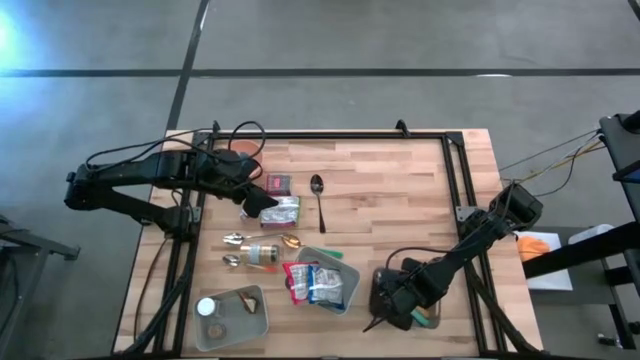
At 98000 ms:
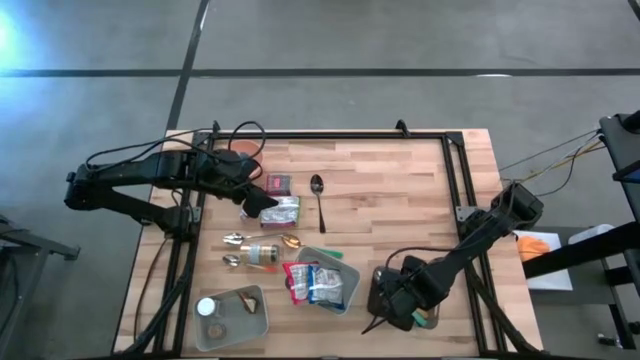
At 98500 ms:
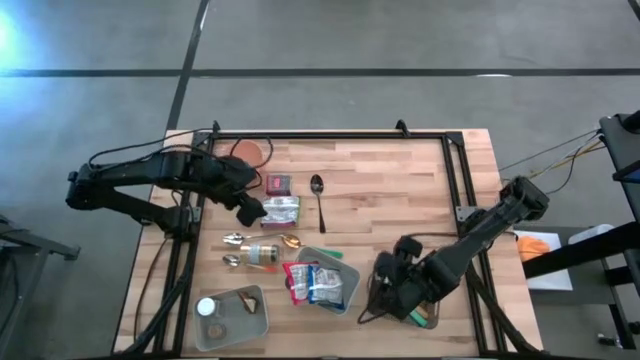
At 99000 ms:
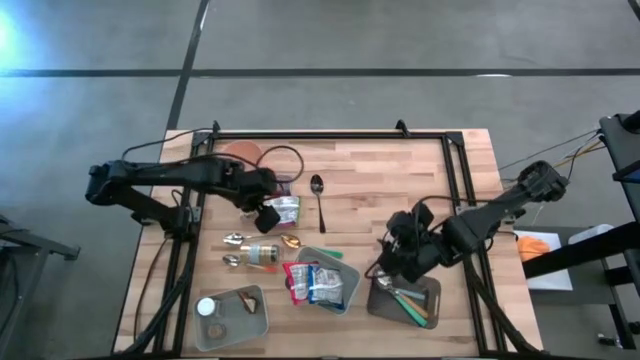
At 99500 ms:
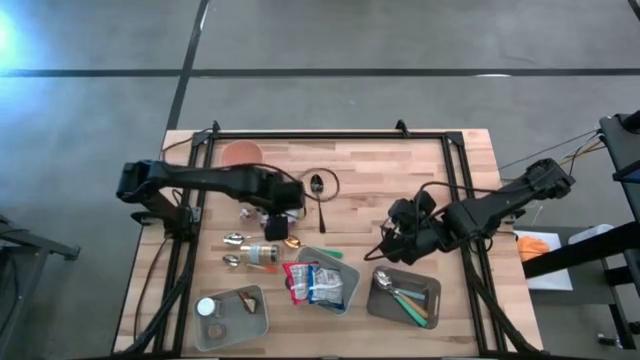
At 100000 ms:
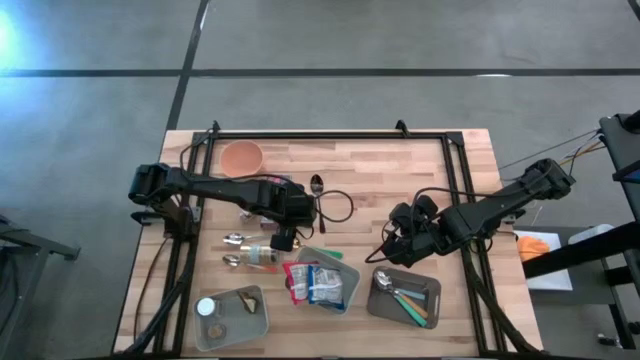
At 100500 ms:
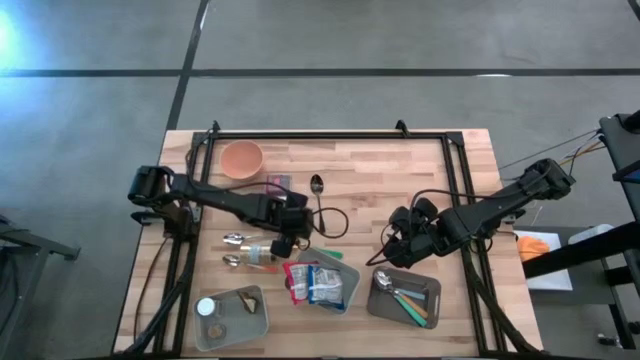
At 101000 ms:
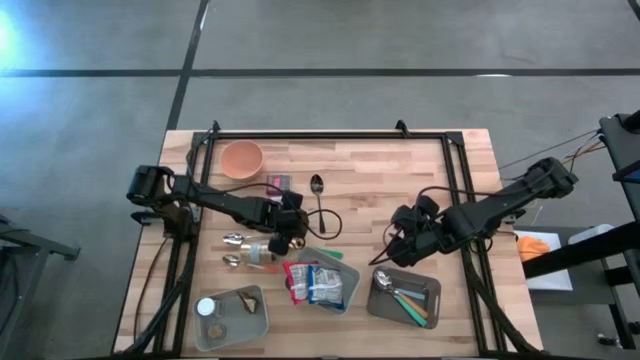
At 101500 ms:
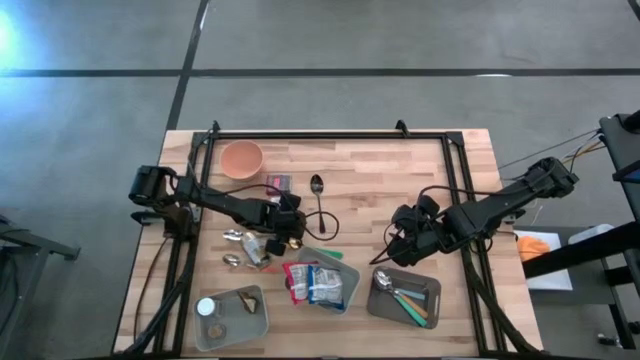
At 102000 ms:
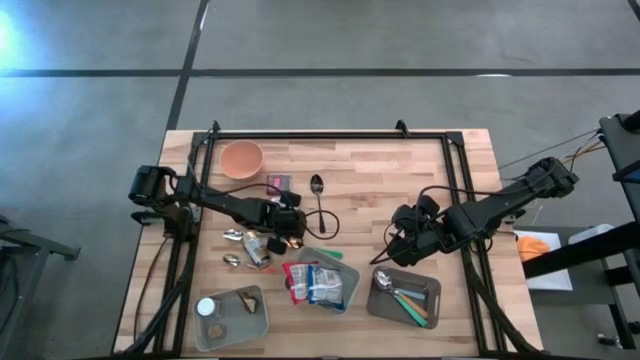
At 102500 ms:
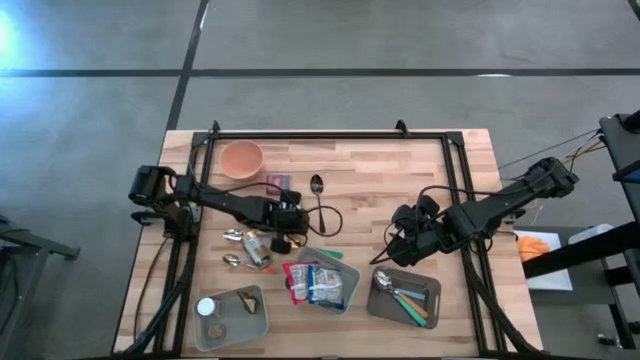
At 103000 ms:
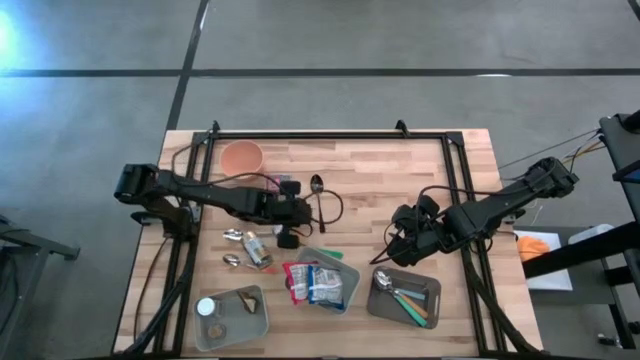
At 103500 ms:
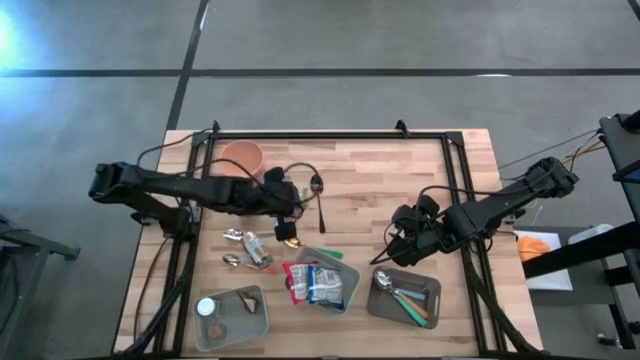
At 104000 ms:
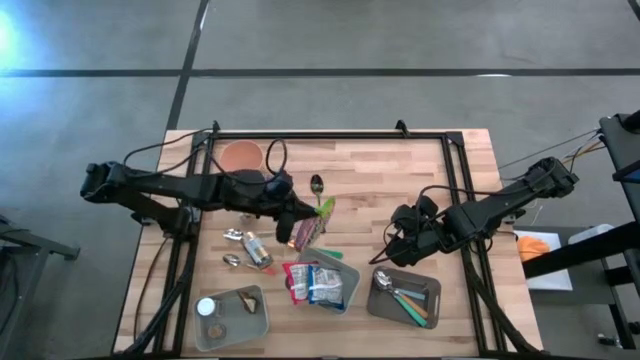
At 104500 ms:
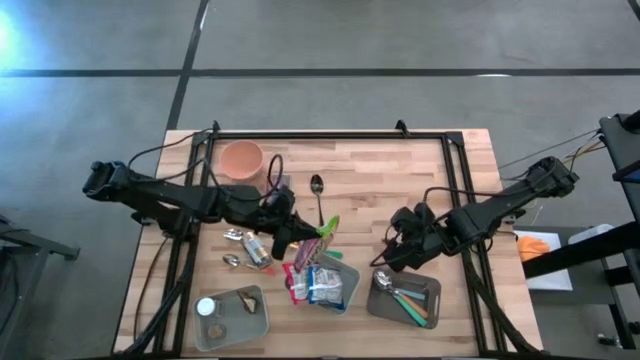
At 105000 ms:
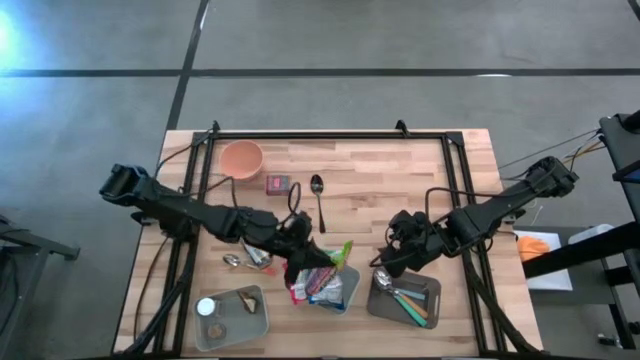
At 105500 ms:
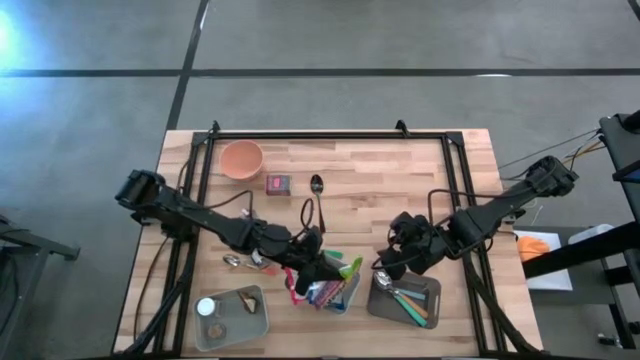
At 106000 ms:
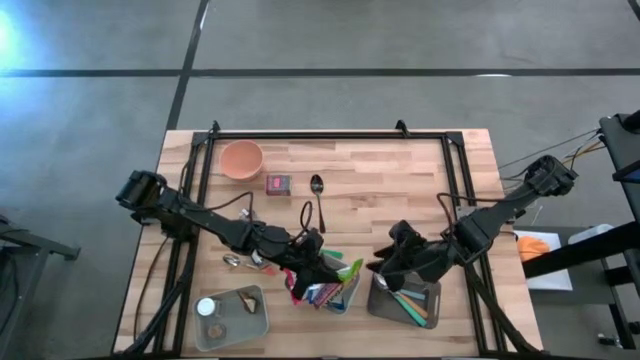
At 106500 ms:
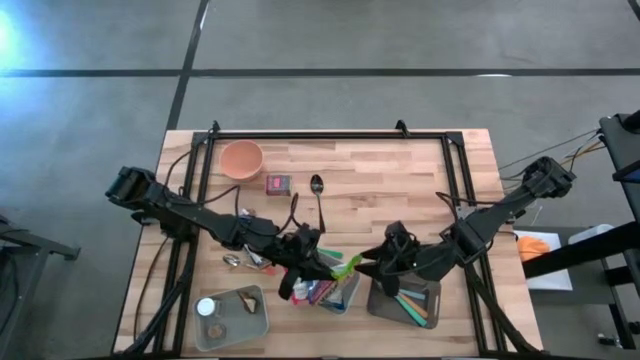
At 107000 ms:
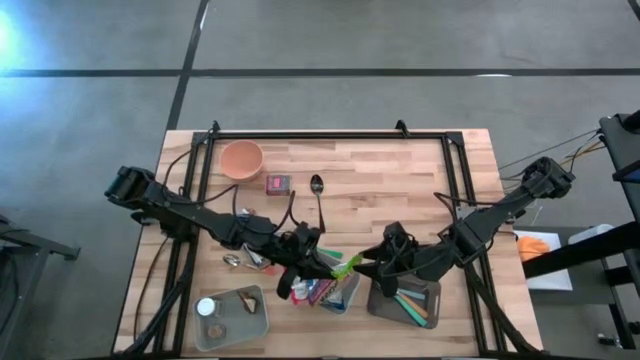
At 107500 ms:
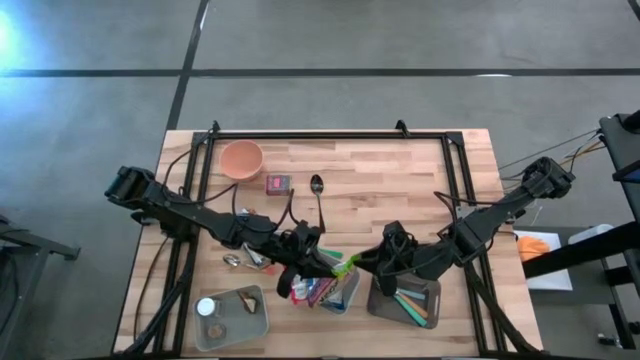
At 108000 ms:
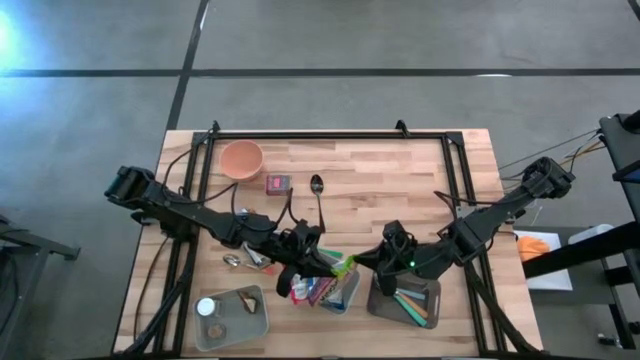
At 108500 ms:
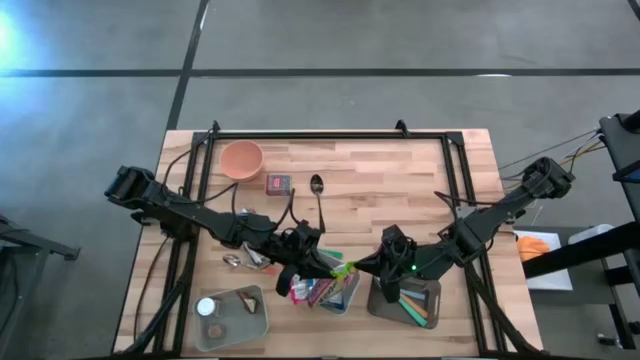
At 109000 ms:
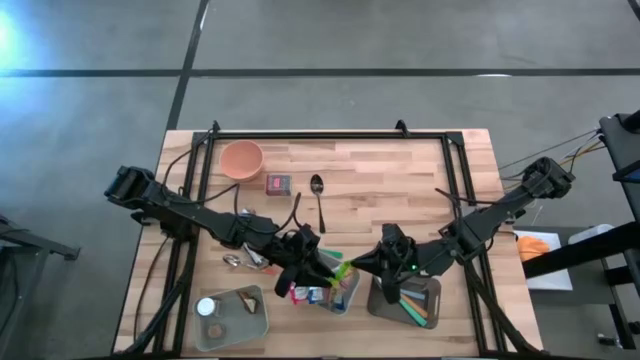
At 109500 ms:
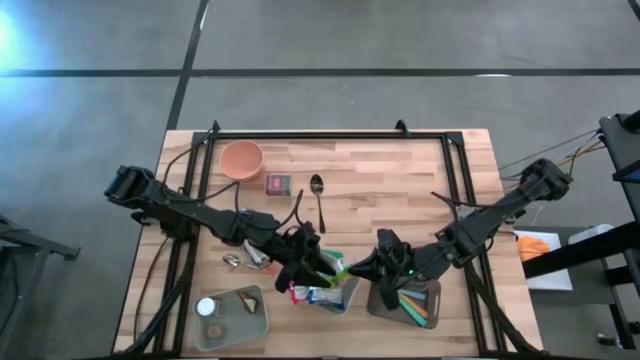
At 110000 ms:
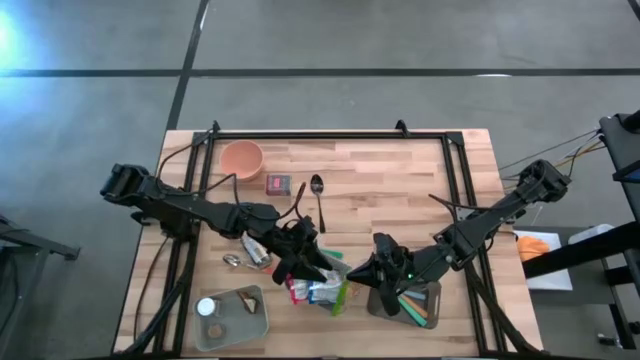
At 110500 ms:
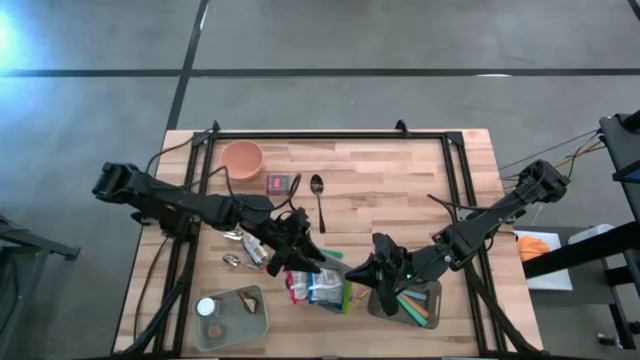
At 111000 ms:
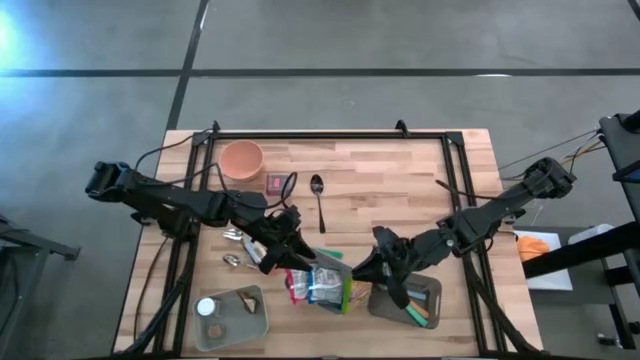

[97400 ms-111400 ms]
Put the green noodle pack into the right gray bin

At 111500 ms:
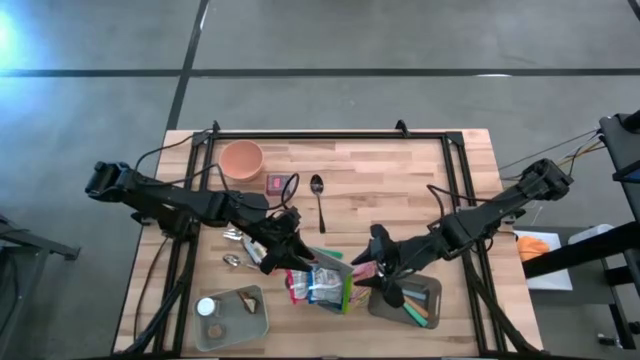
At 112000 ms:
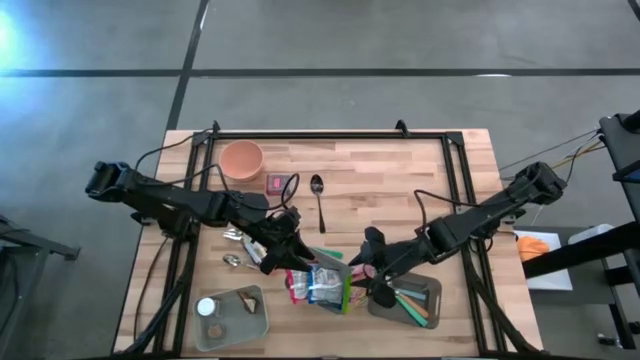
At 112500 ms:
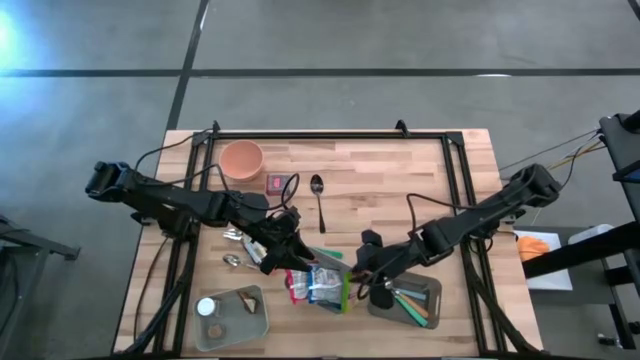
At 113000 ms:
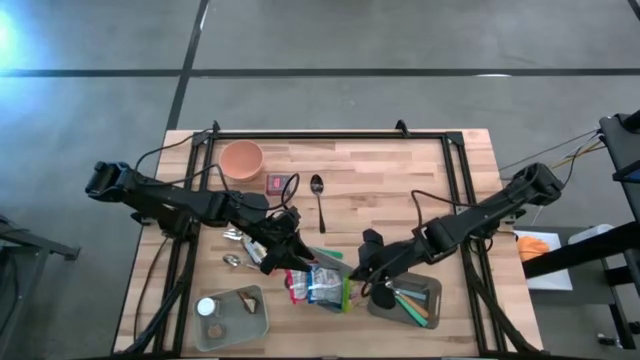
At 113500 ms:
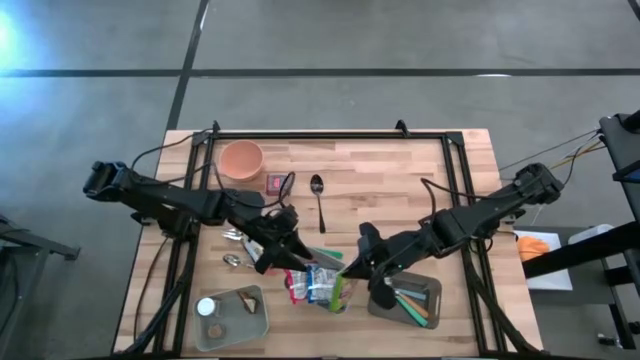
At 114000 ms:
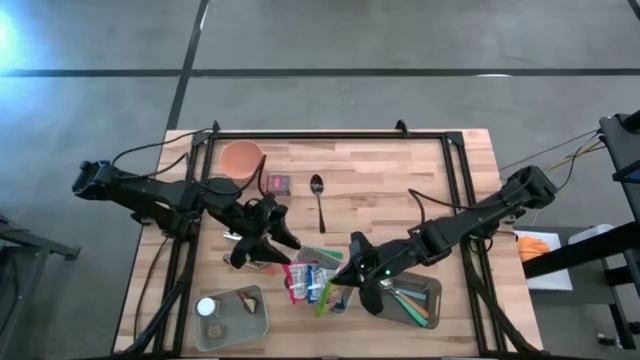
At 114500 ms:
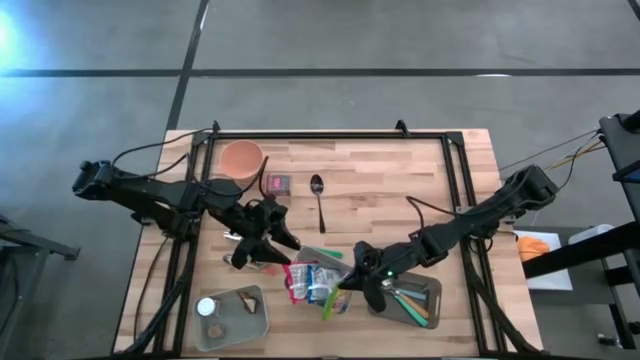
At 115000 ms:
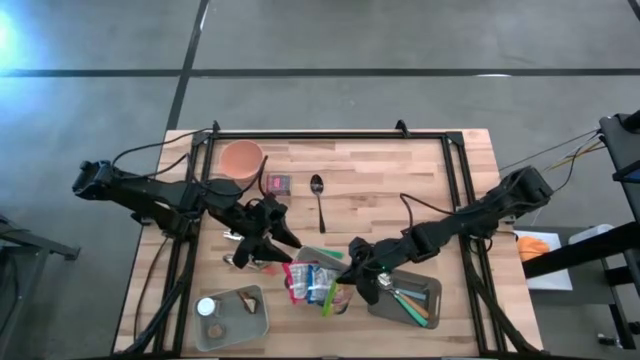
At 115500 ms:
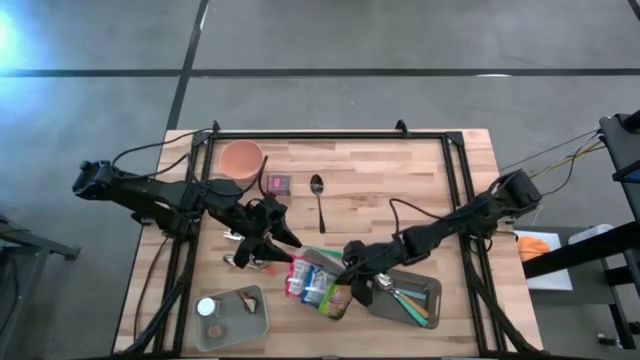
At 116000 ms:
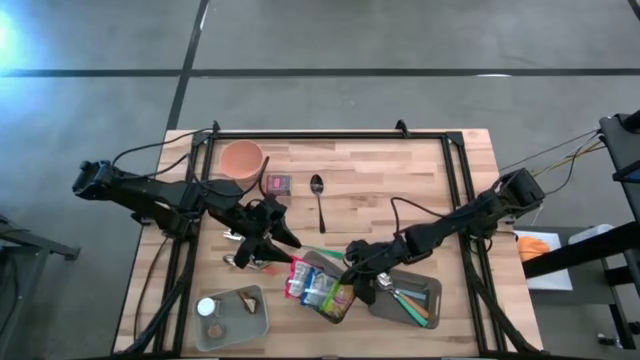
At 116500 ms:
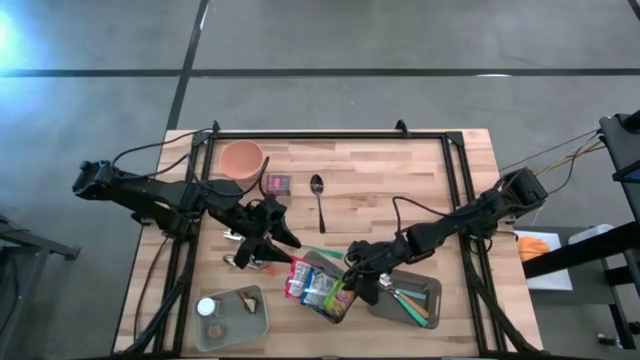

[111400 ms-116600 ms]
Put the green noodle pack into the right gray bin
